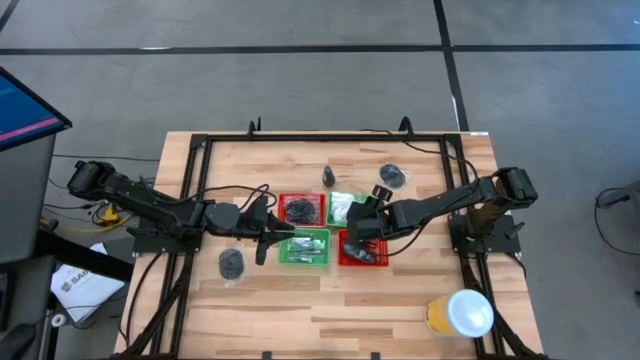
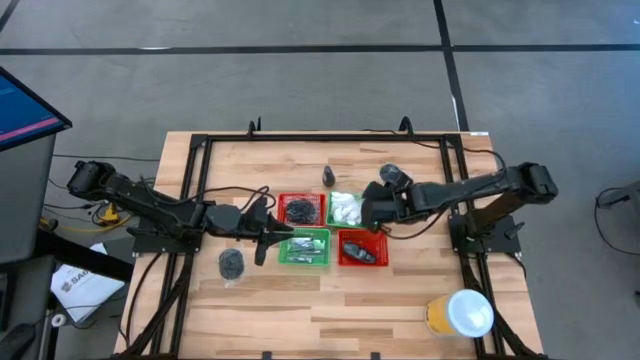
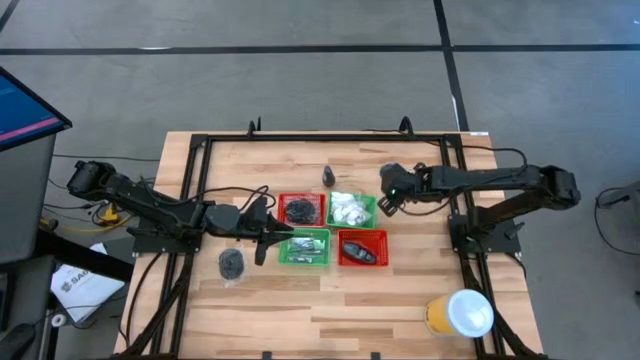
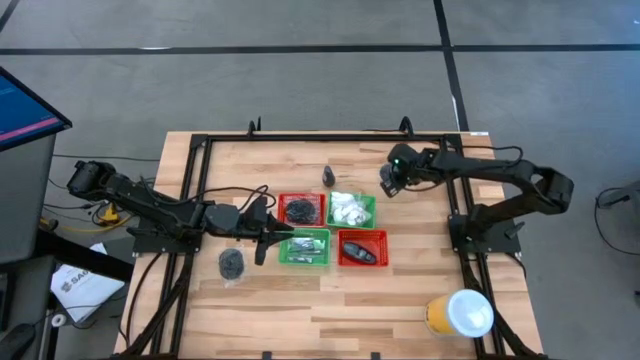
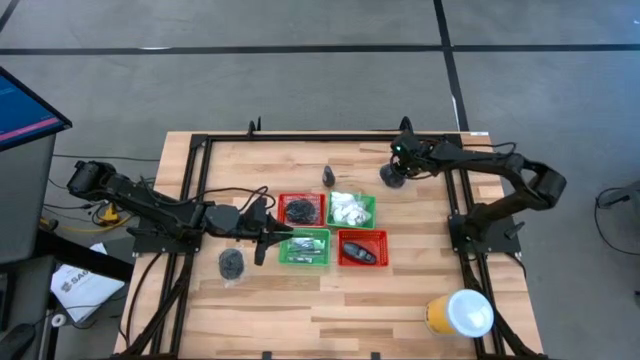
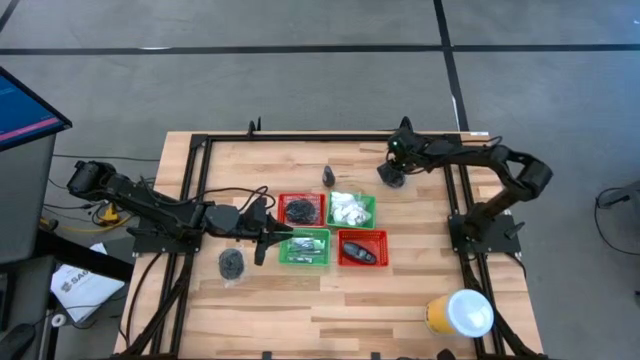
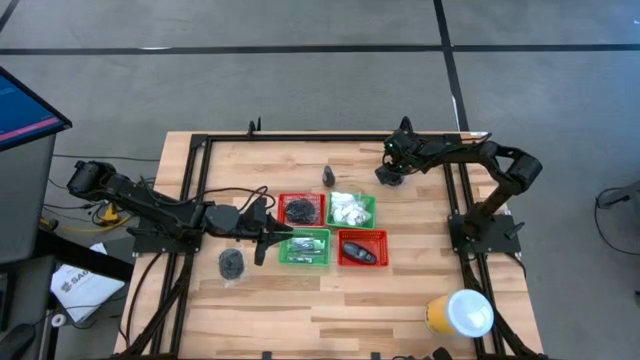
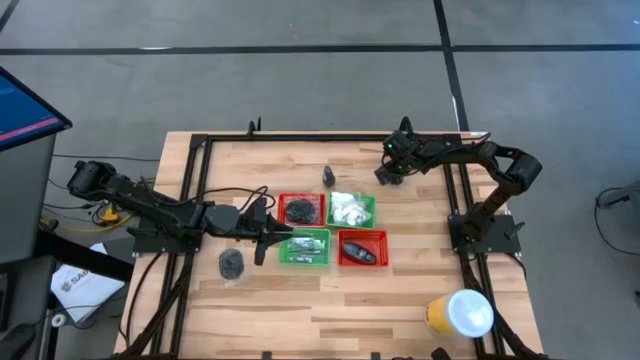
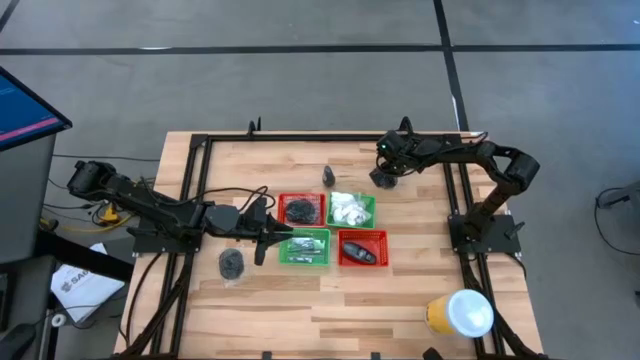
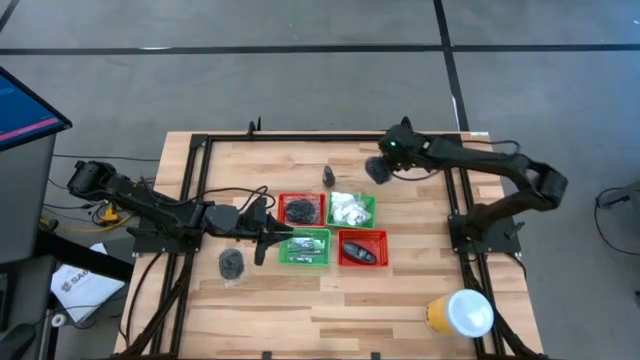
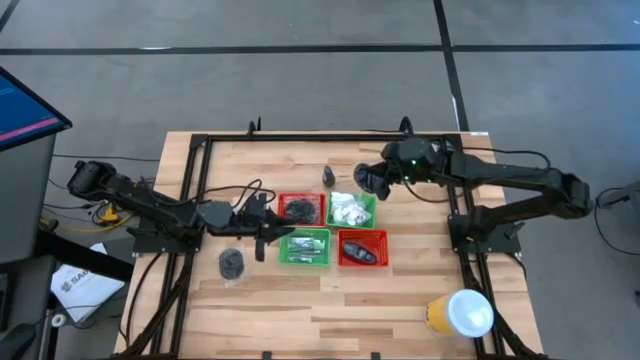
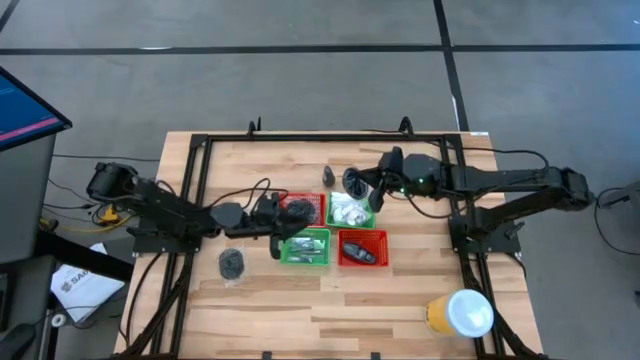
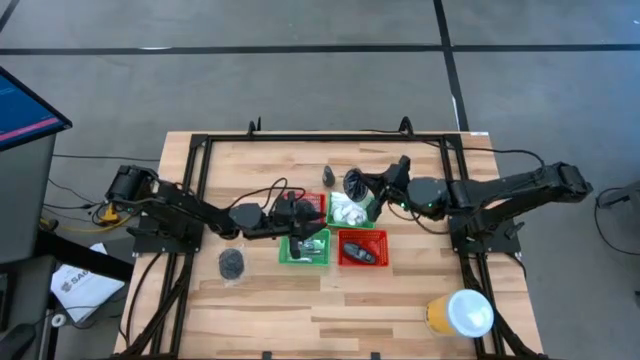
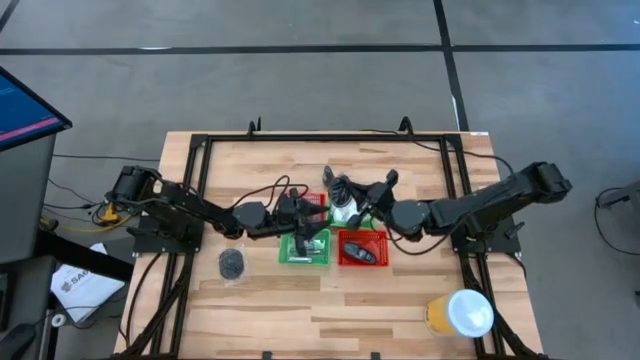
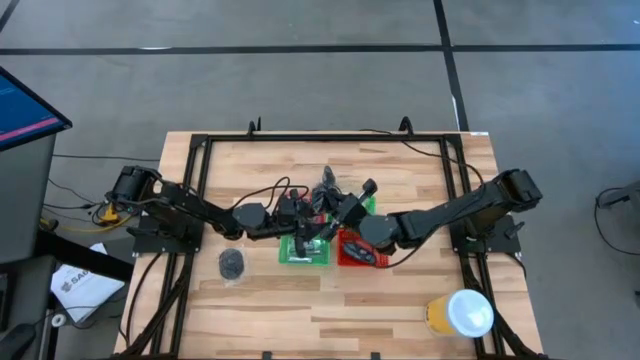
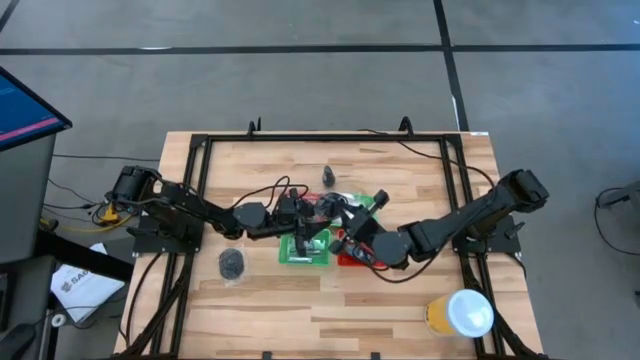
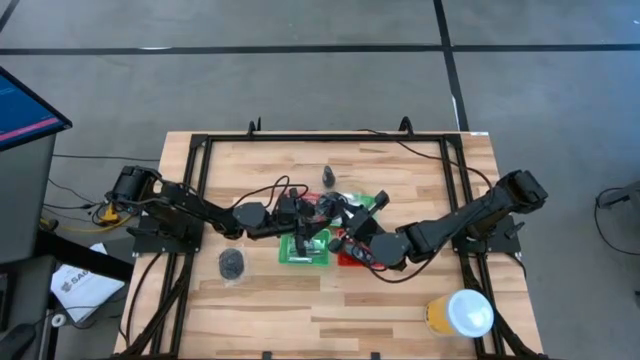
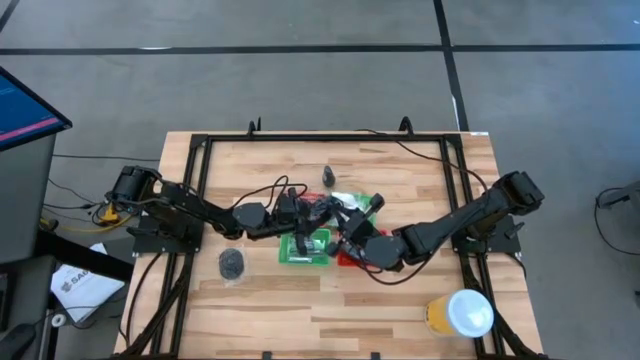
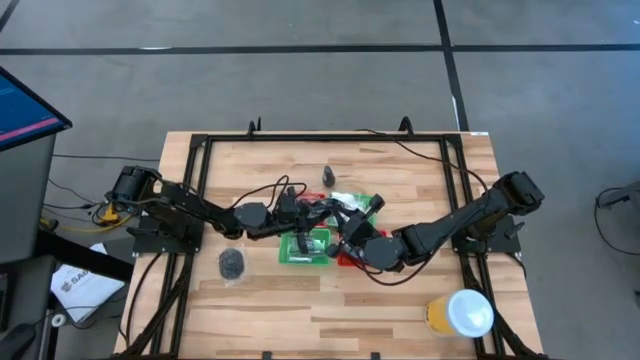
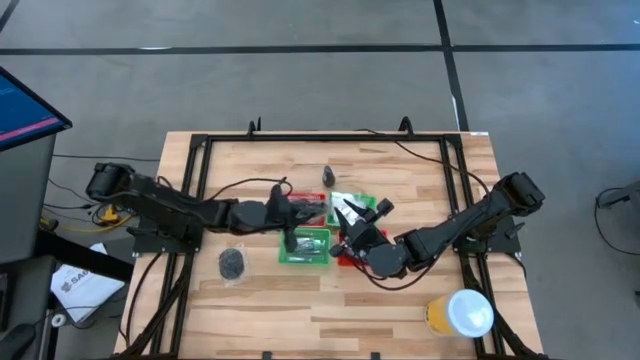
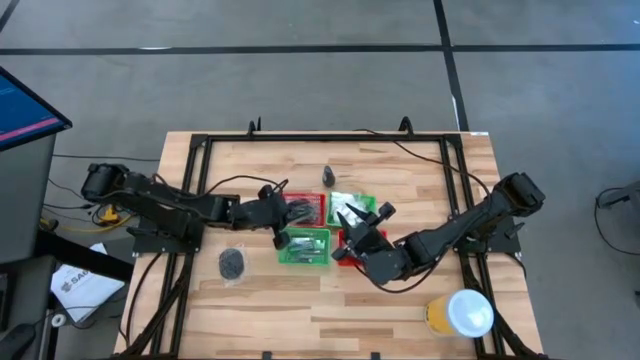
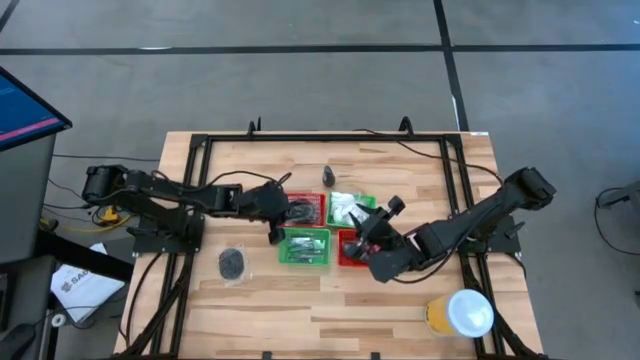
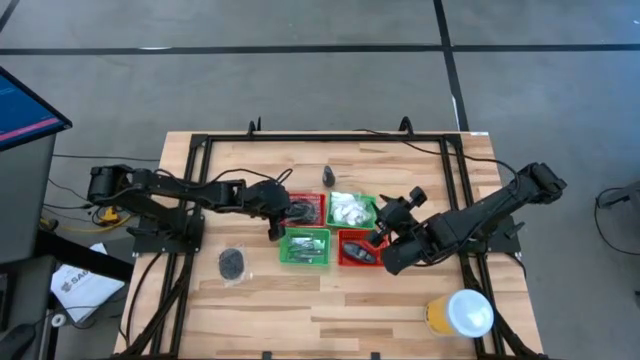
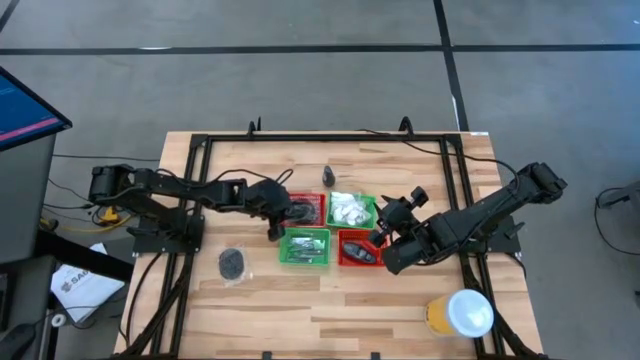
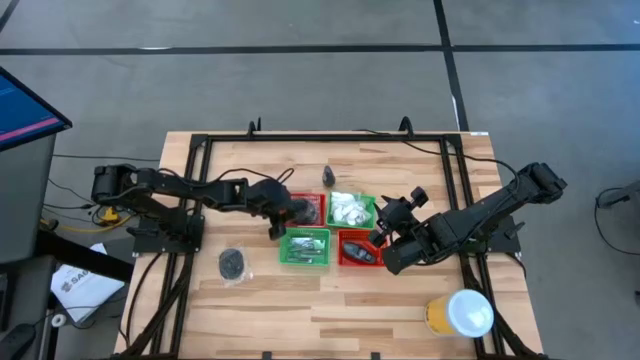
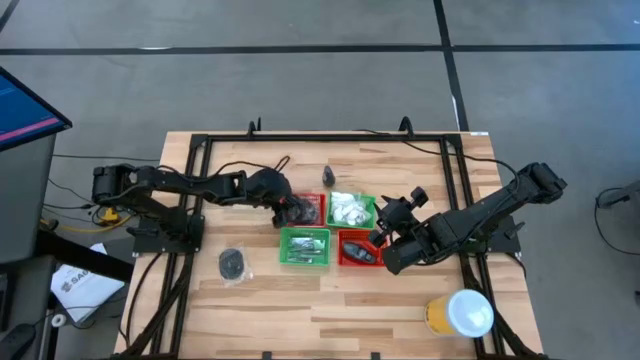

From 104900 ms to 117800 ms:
Task: Pick & Place Travel size toiletries
Put the black hairbrush into the left red basket

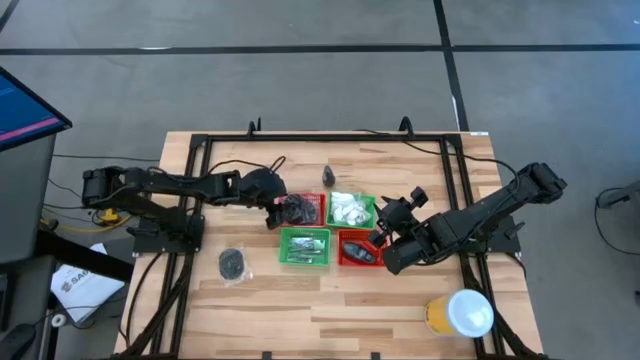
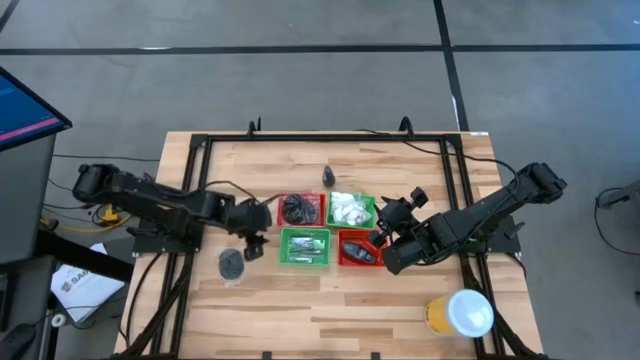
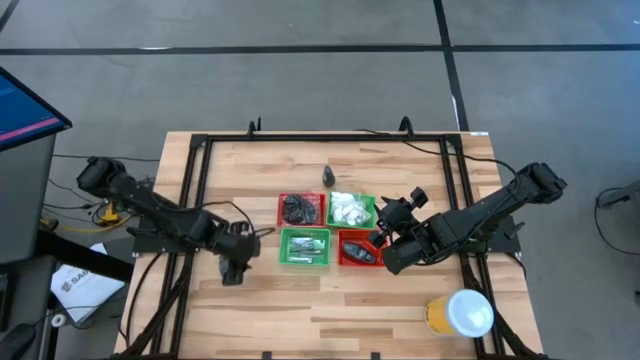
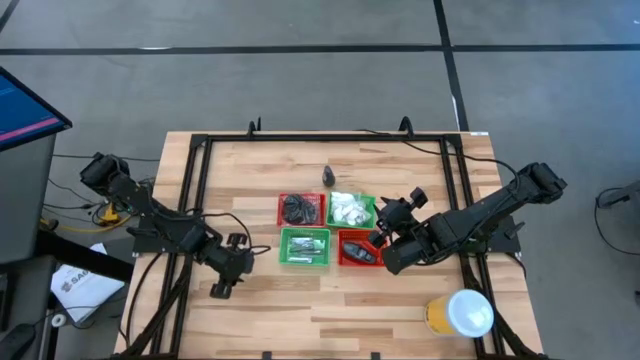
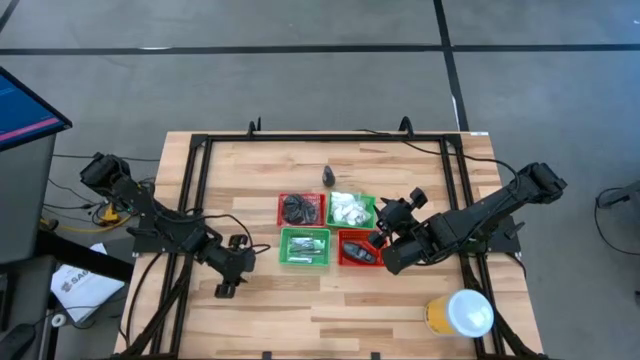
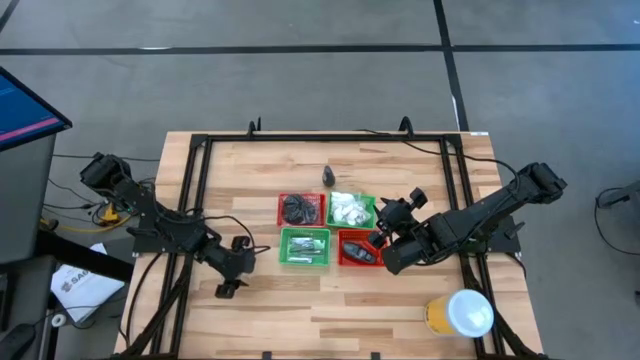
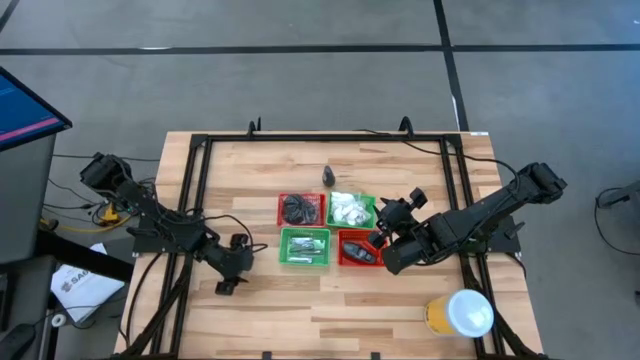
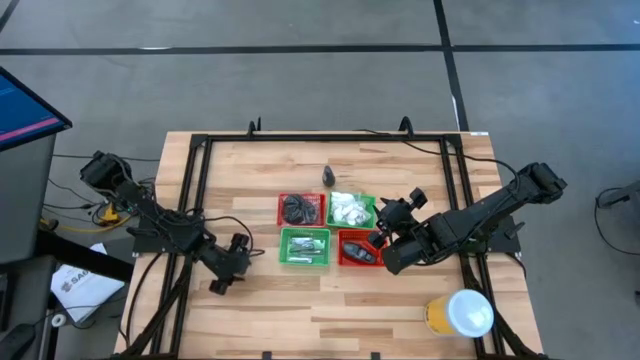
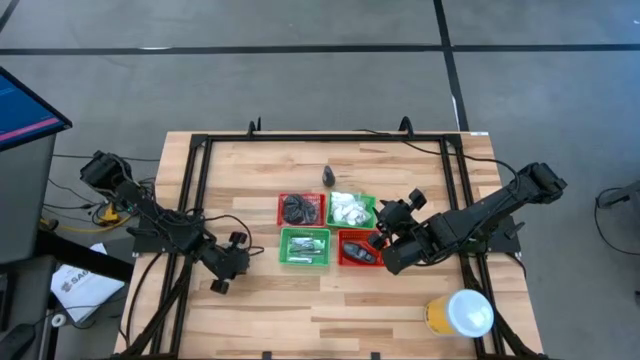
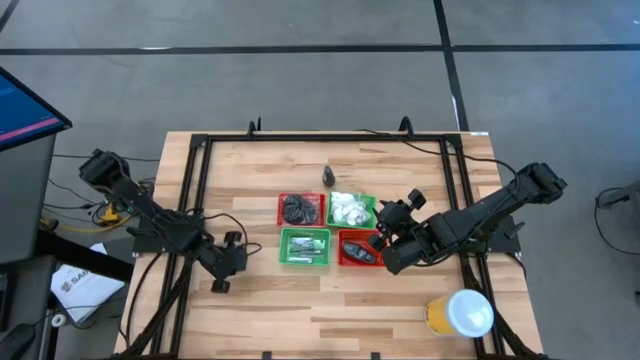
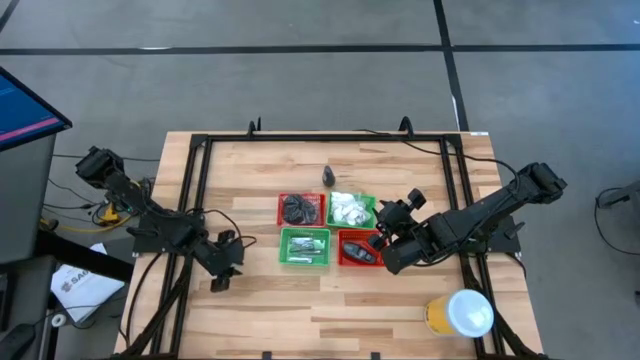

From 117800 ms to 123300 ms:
Put the black hairbrush into the left red basket

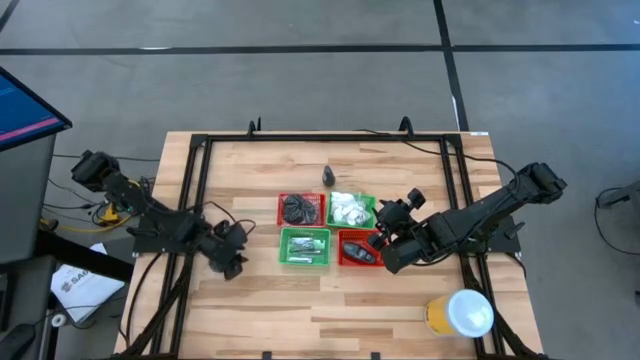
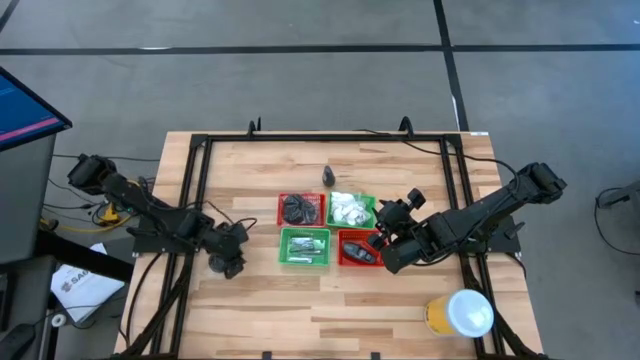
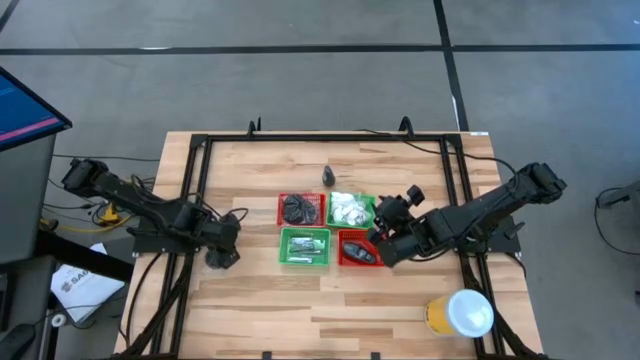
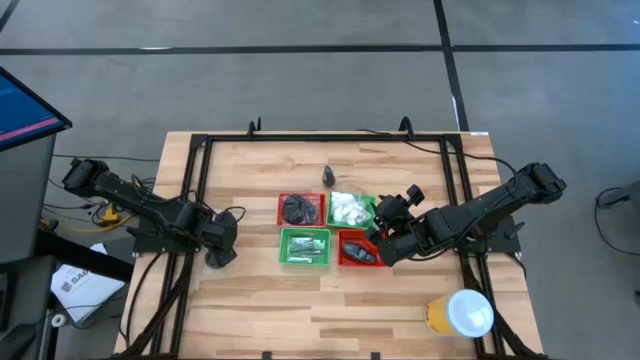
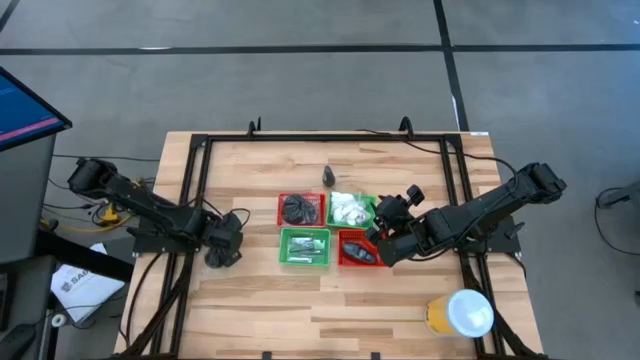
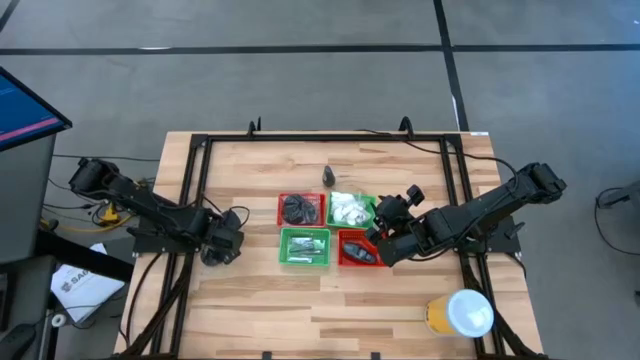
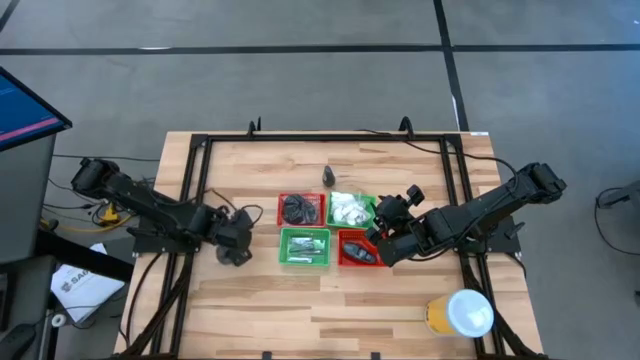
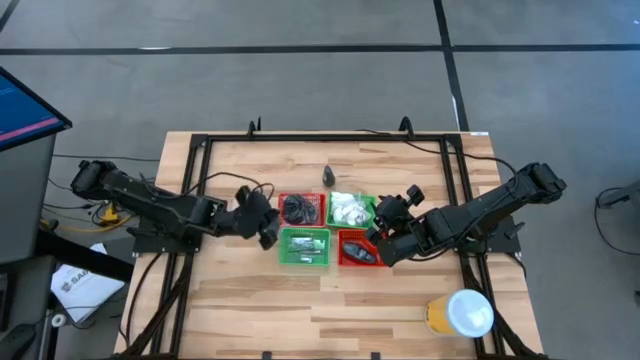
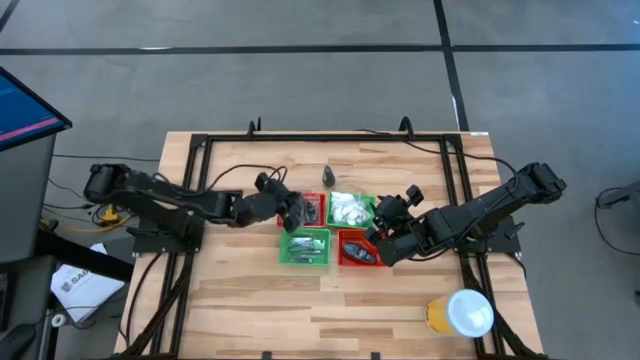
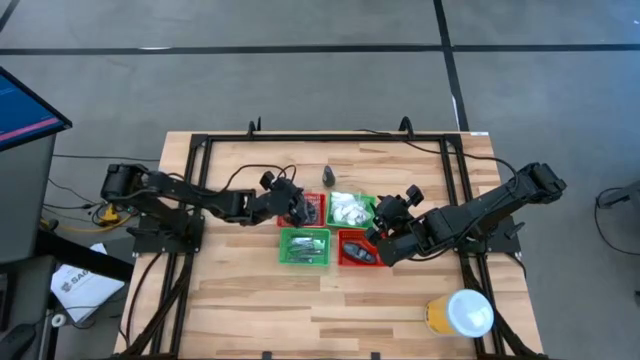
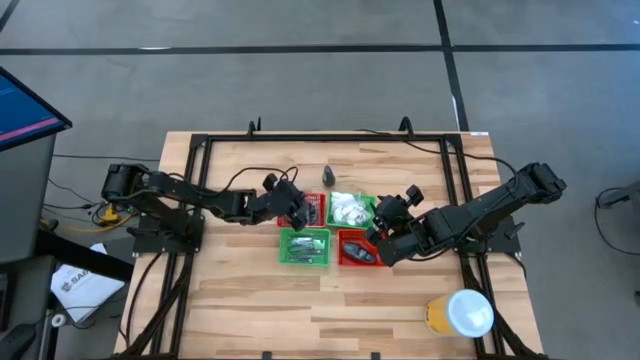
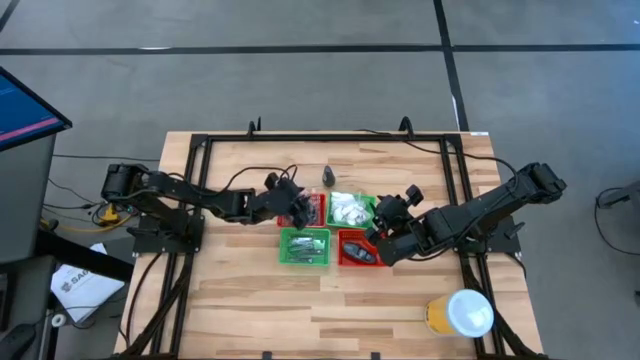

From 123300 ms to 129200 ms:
Put the black hairbrush into the left red basket
